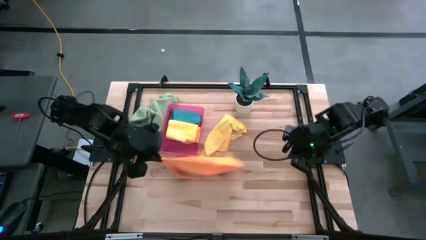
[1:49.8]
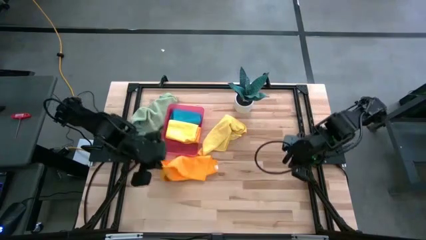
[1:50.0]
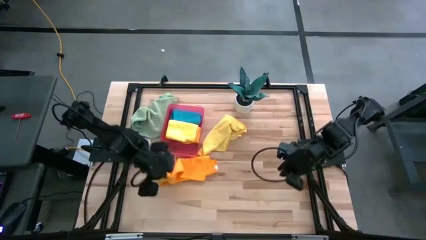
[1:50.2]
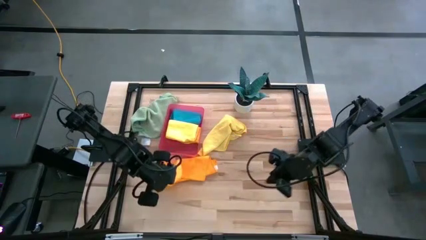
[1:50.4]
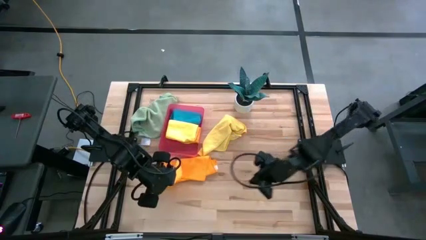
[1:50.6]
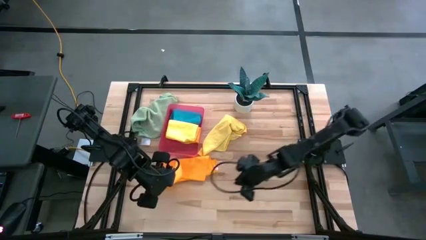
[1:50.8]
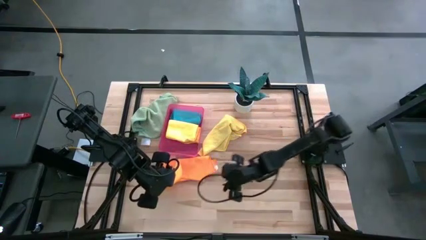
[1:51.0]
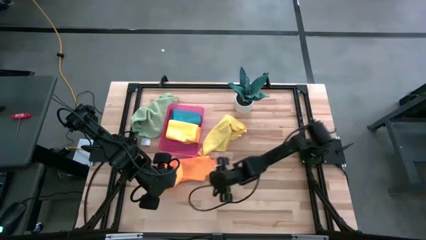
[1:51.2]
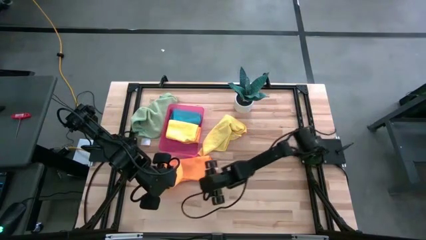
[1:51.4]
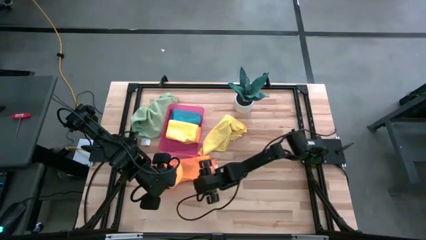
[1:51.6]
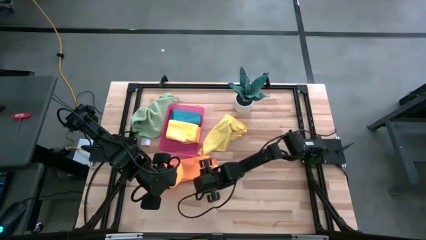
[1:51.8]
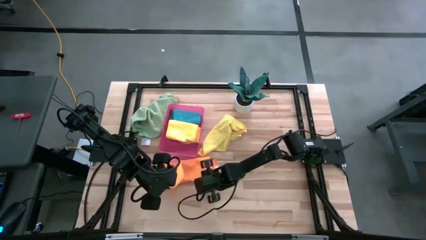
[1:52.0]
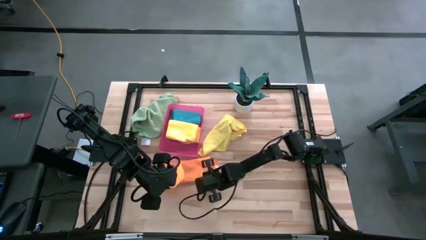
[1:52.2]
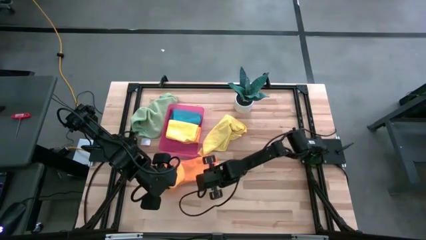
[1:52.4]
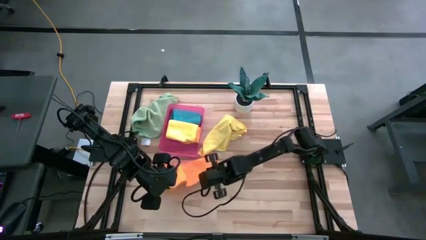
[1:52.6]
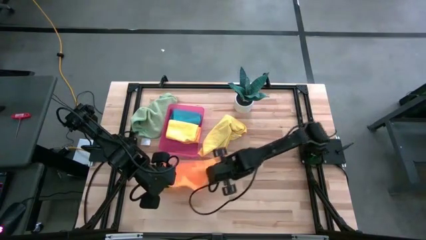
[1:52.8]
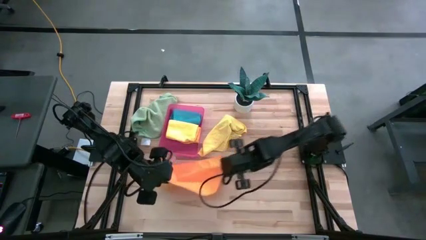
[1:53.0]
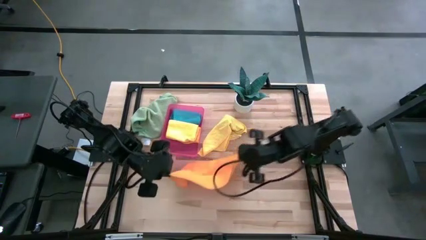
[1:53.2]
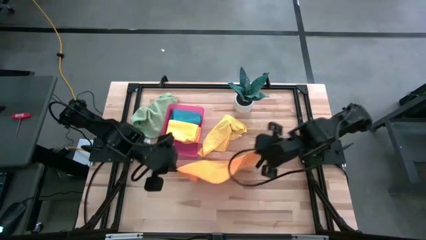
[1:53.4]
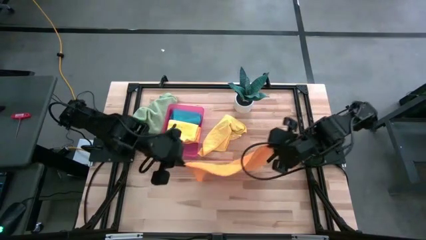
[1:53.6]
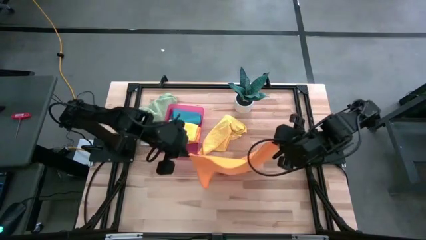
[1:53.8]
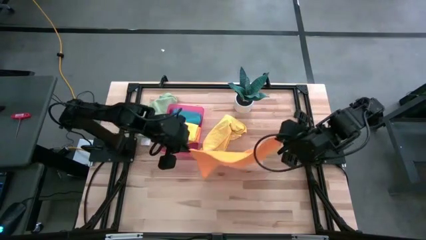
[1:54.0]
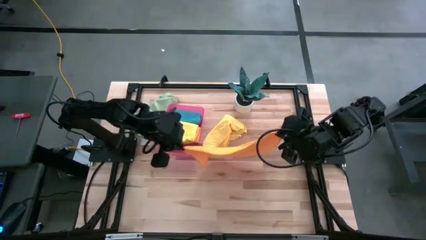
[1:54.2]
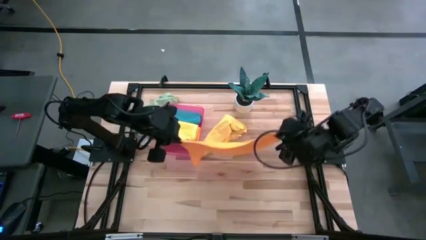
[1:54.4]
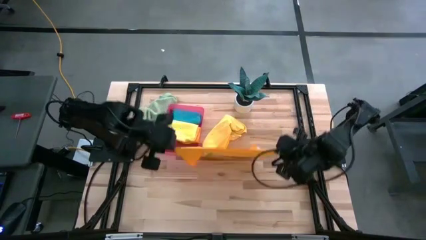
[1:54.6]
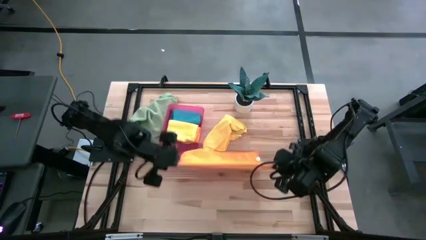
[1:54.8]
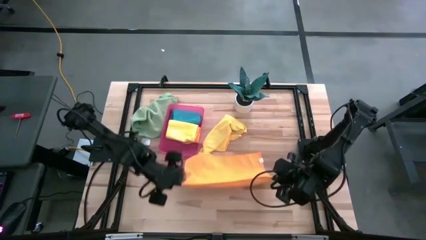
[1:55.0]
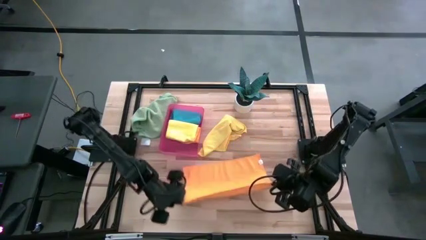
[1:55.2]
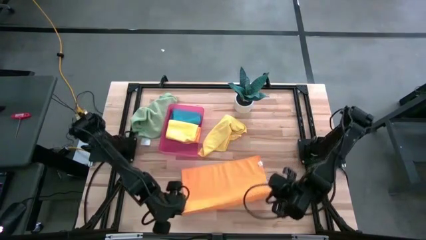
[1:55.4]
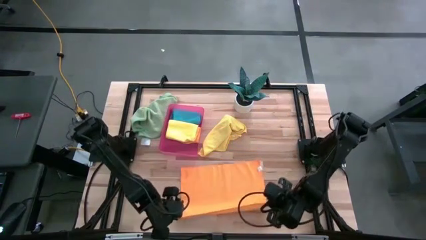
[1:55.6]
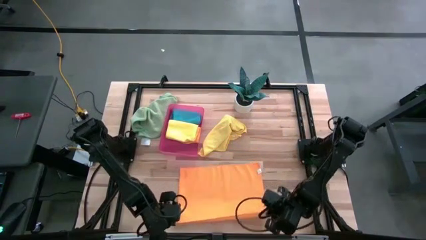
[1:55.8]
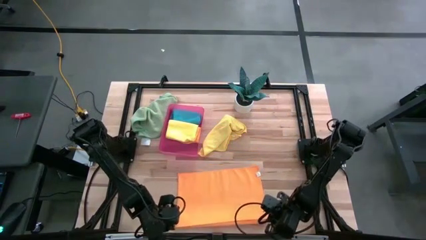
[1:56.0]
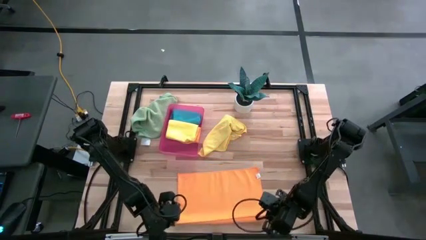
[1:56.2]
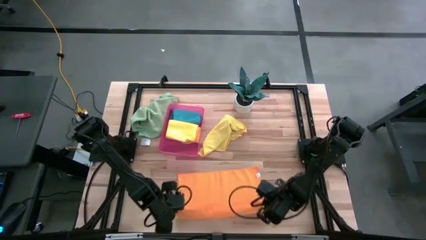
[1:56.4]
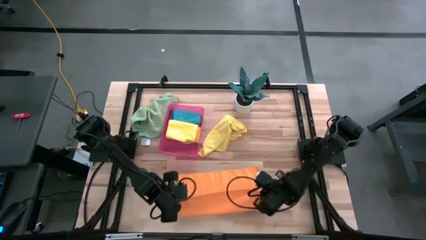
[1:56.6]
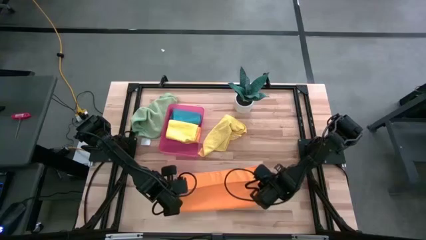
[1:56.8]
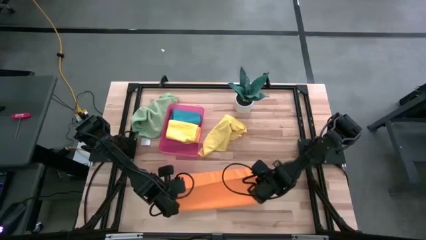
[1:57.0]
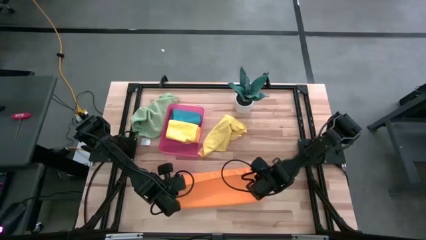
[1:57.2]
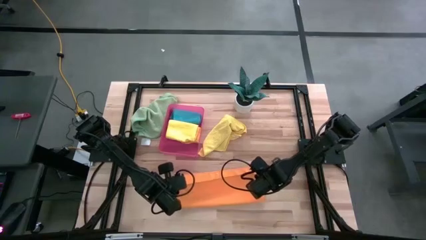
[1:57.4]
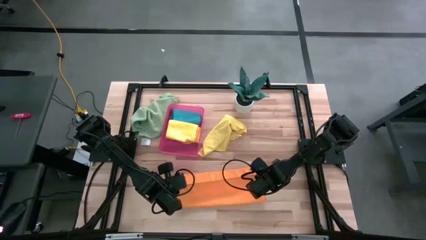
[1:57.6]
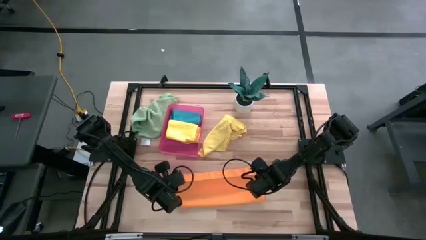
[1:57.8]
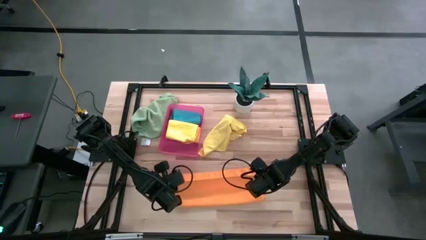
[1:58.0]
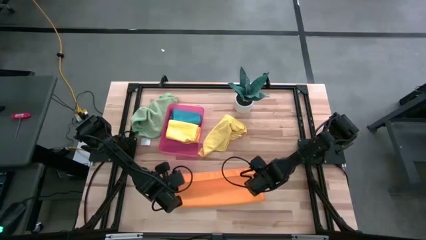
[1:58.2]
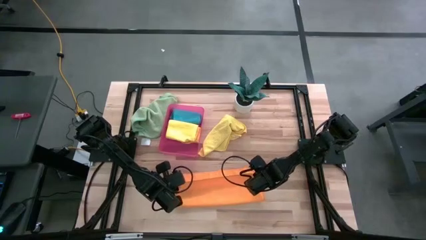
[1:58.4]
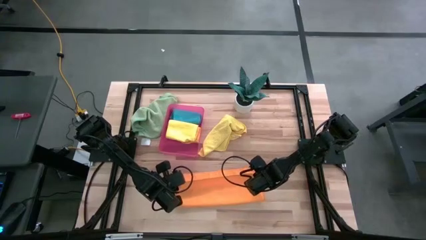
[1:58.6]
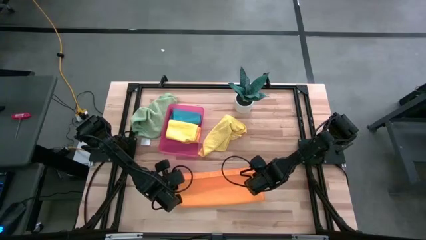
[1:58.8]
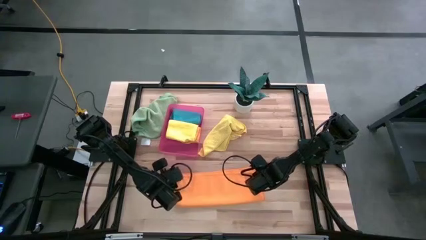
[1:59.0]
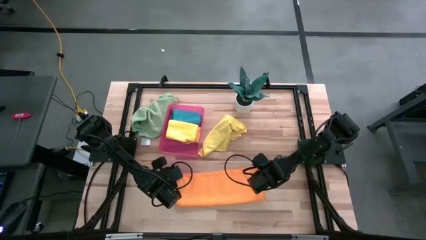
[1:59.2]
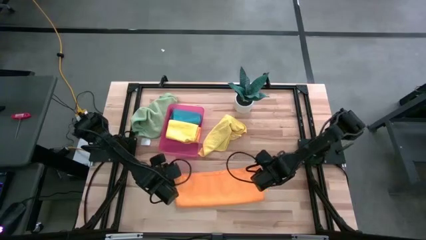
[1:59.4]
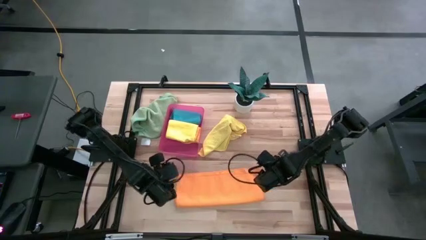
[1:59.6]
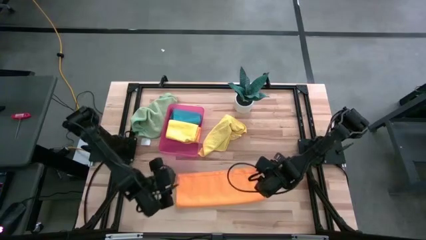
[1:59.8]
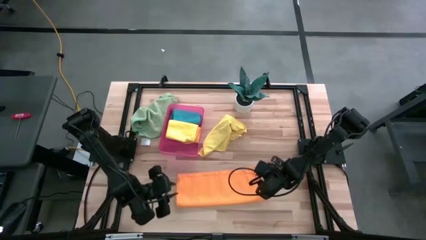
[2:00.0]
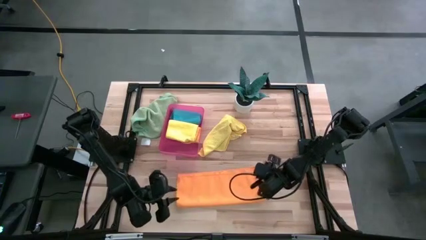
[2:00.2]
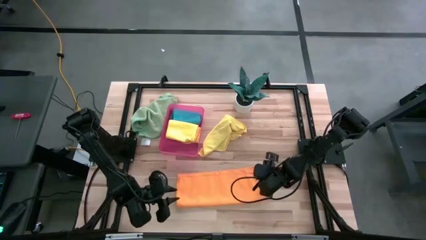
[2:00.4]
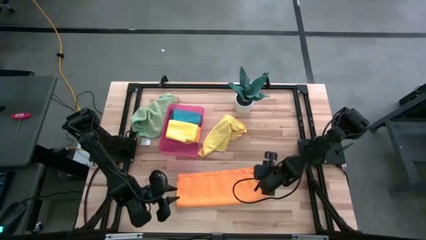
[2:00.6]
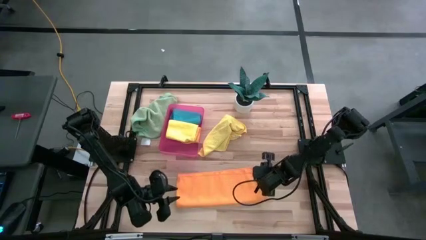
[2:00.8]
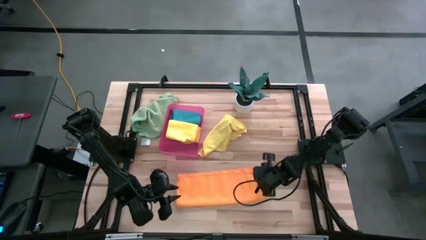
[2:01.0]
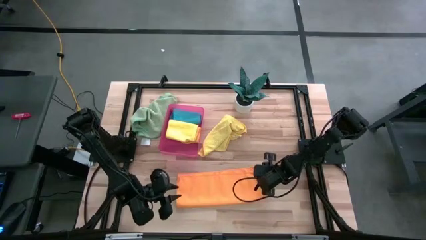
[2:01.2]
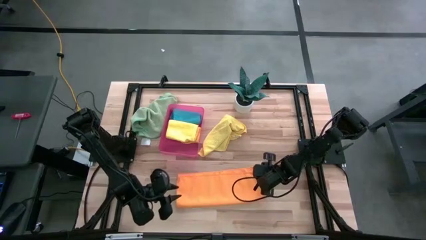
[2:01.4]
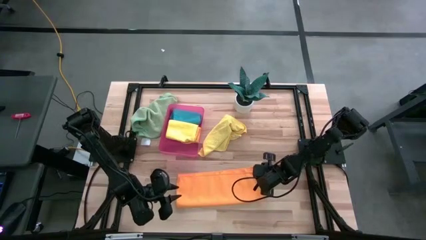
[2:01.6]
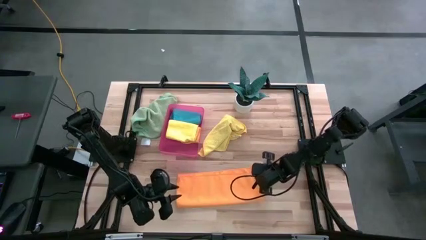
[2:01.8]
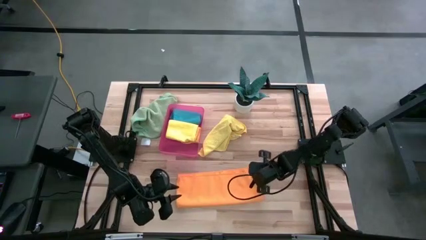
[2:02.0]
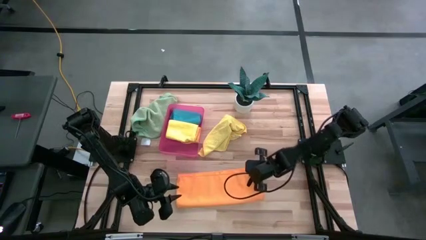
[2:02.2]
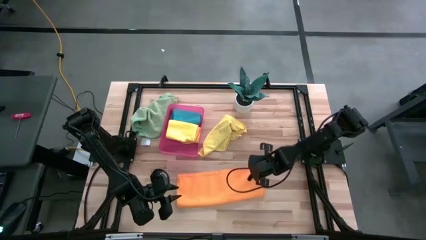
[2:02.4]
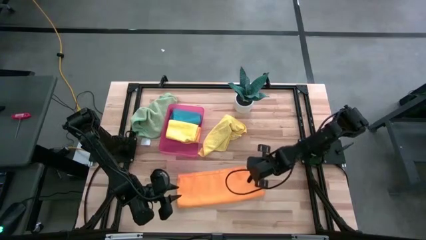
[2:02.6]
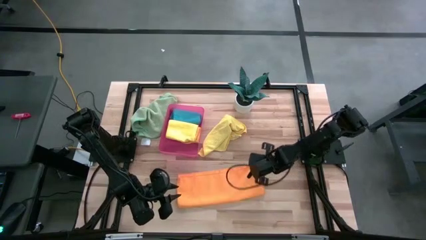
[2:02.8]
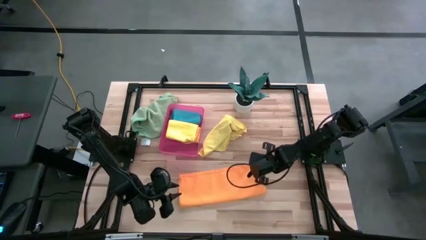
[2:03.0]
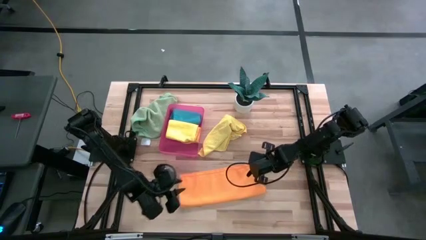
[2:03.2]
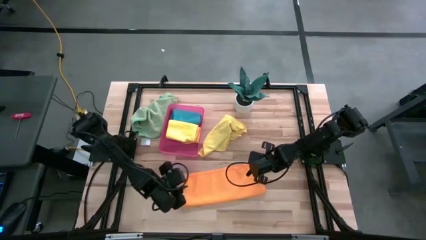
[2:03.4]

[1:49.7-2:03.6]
Task: Fold microfiber towels
Fold the orange microfiber cloth

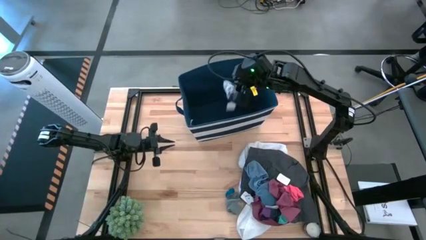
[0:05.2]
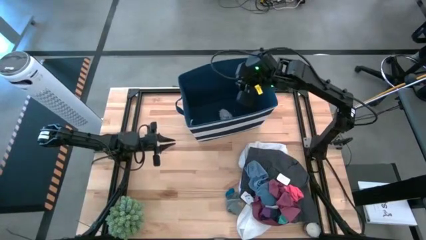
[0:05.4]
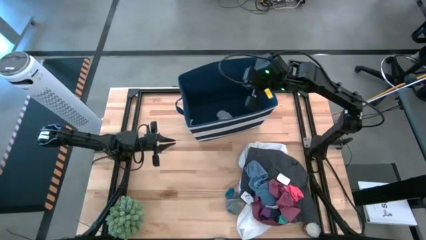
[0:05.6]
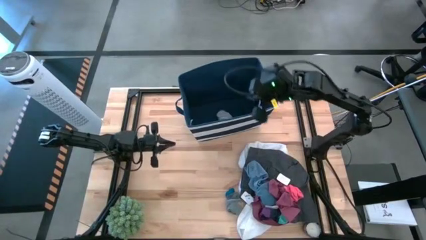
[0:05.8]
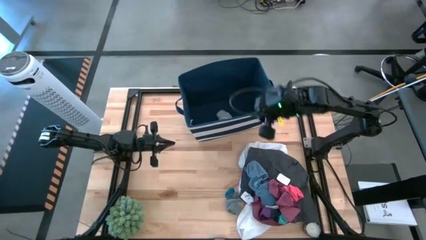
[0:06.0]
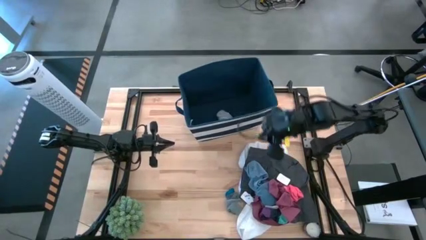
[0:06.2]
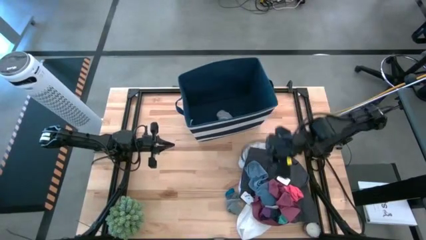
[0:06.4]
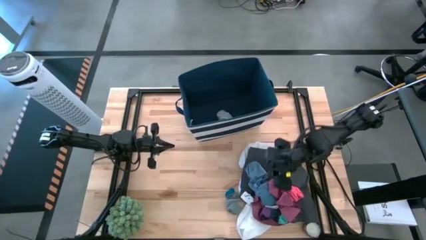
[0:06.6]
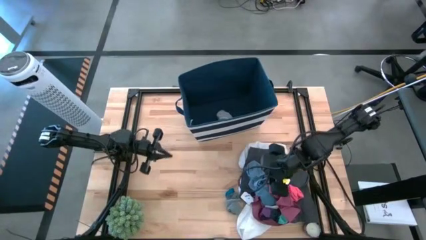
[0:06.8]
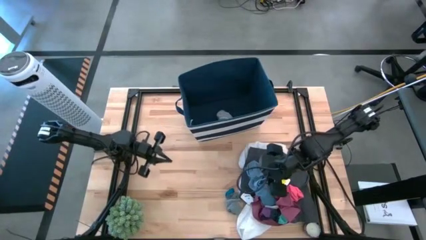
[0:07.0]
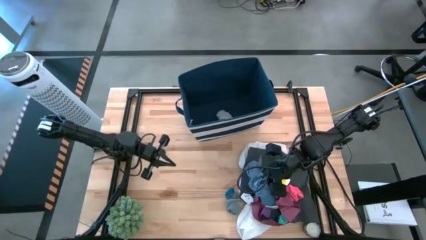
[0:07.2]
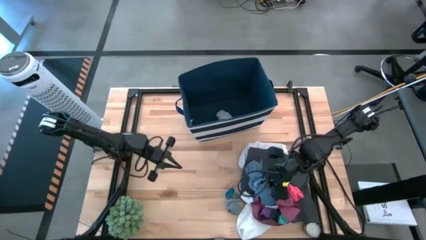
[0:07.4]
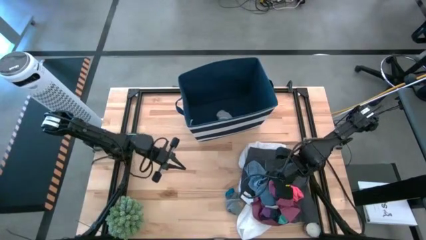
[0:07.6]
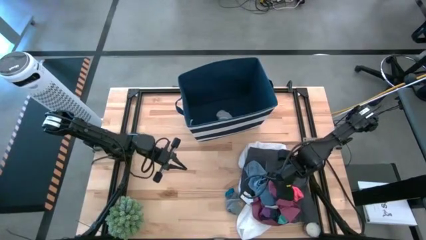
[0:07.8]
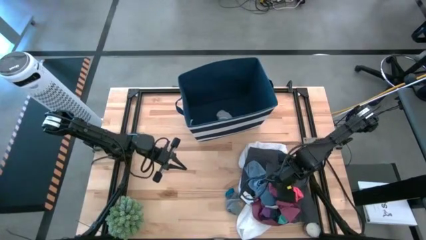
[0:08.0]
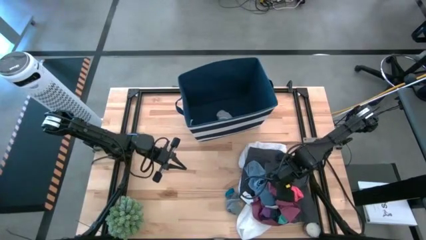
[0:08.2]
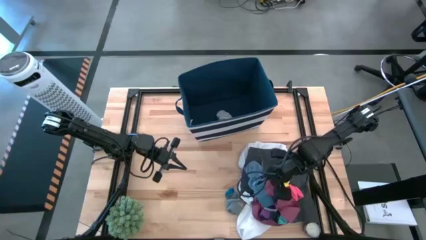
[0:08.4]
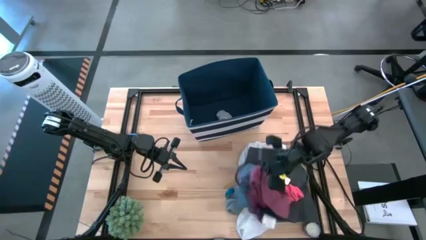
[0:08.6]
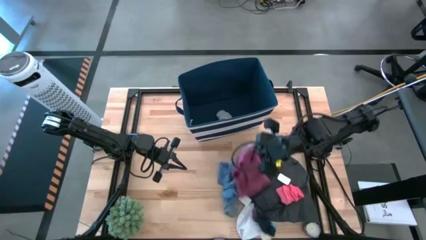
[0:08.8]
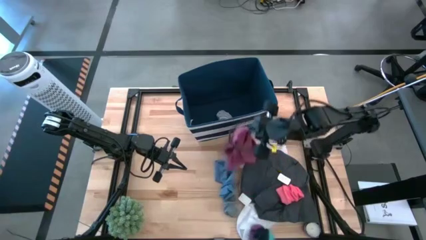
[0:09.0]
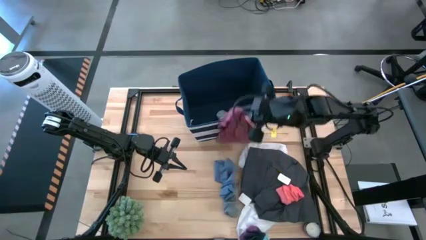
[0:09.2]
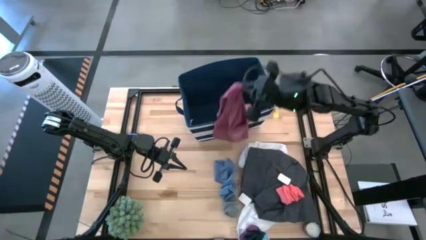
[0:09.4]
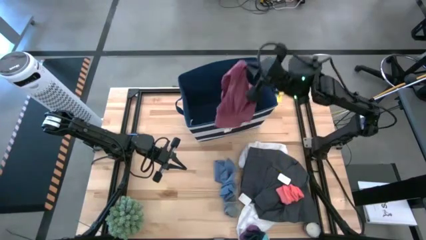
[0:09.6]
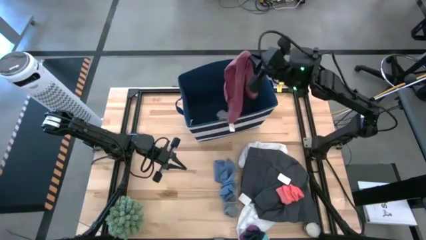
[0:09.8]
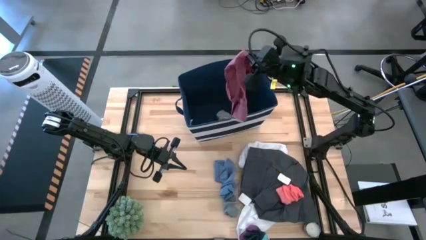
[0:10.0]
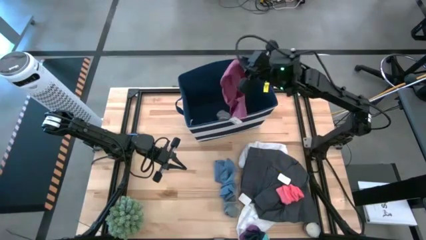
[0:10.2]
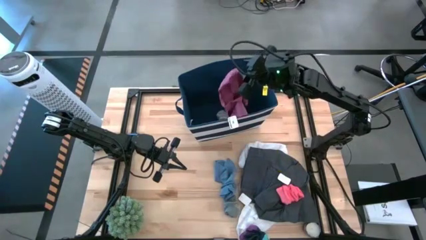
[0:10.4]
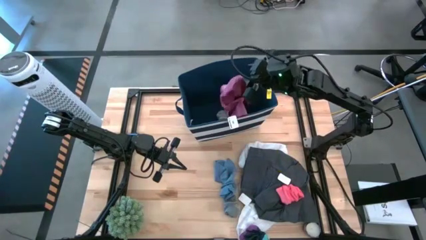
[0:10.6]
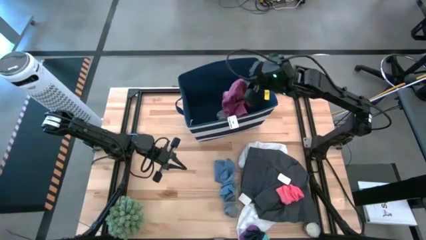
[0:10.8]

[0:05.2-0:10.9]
Task: Sort clothes
Put the dark red underwear into the laundry bin
